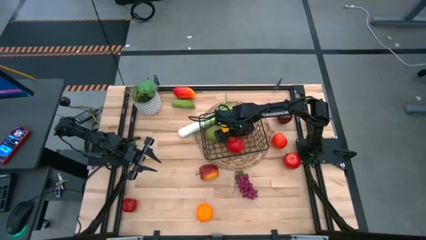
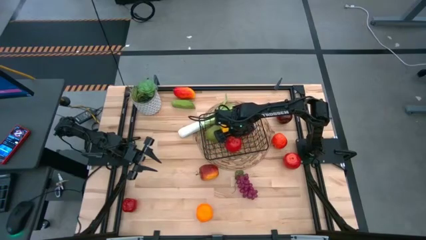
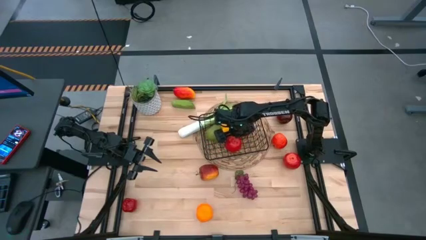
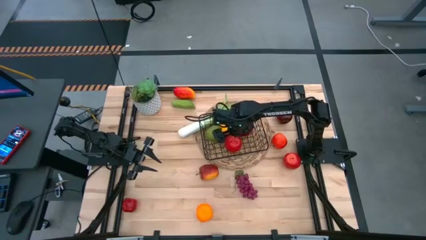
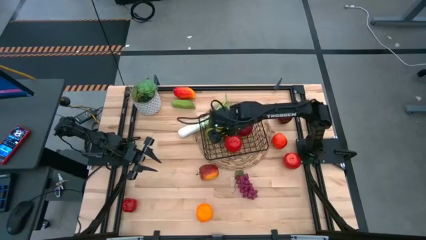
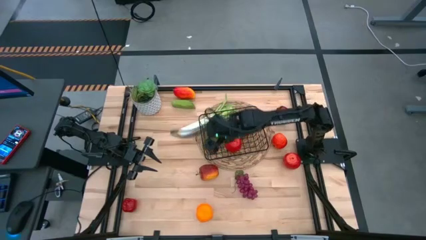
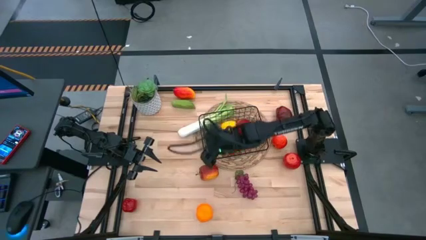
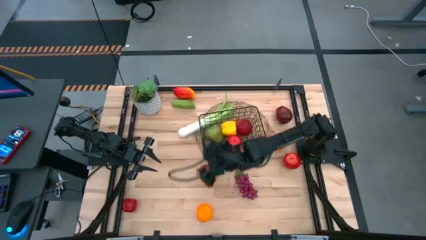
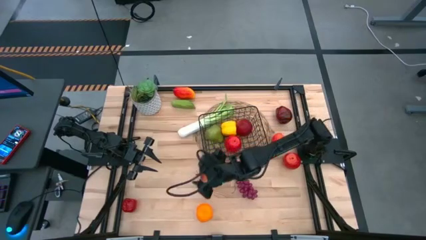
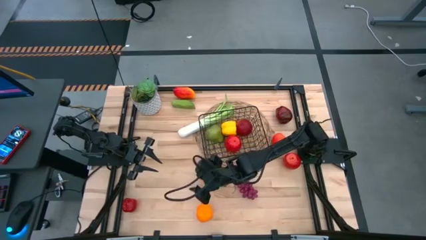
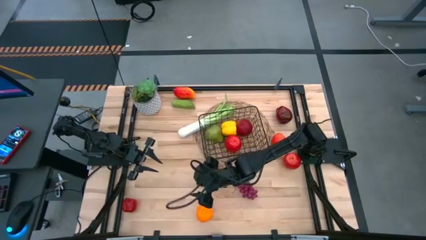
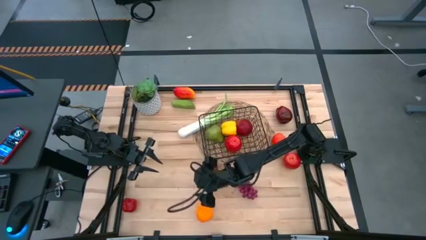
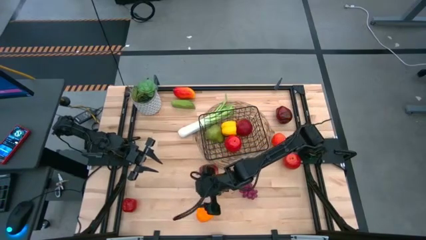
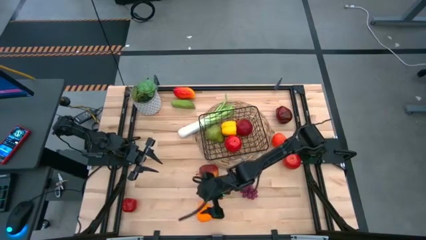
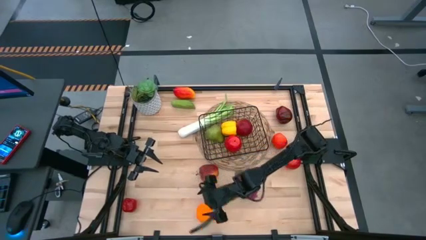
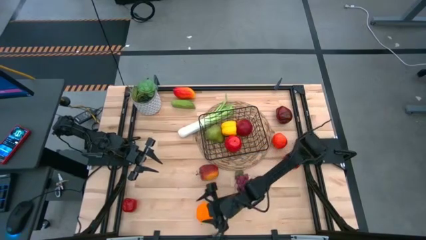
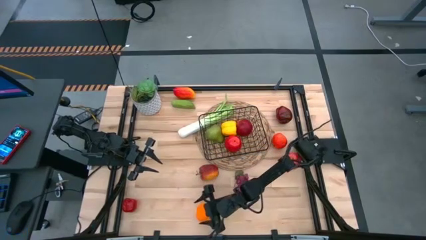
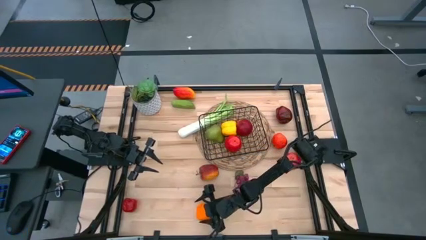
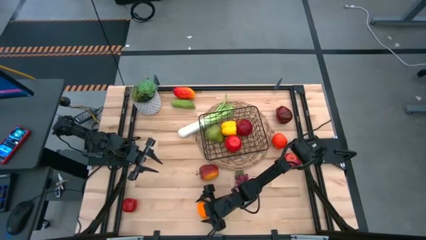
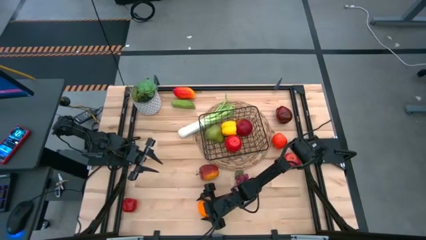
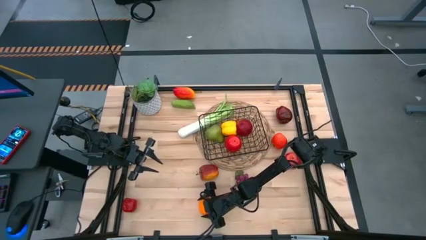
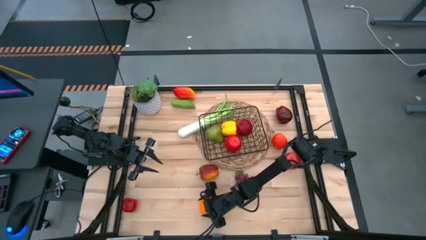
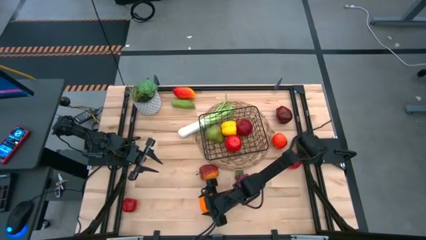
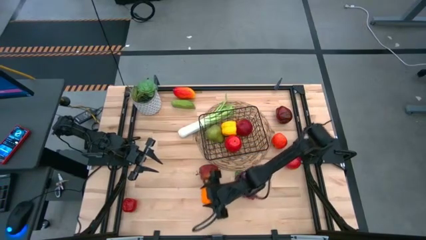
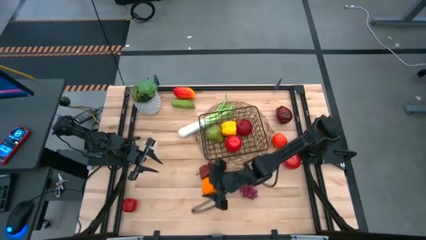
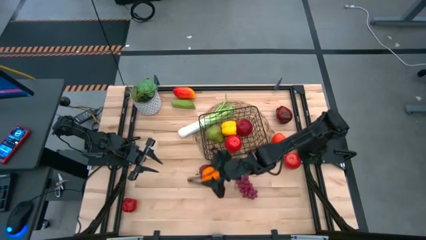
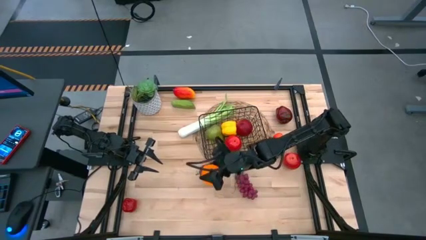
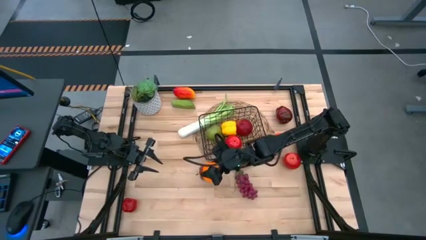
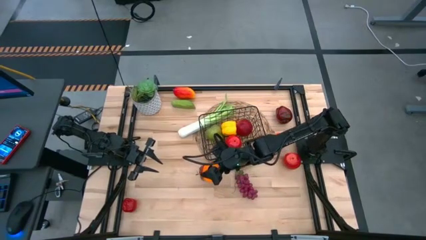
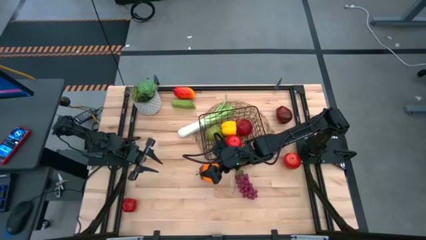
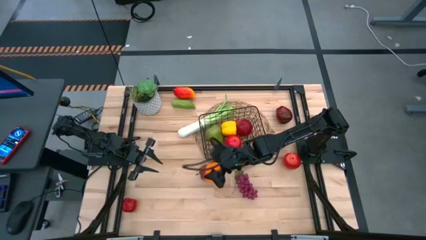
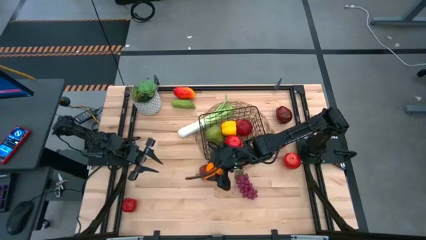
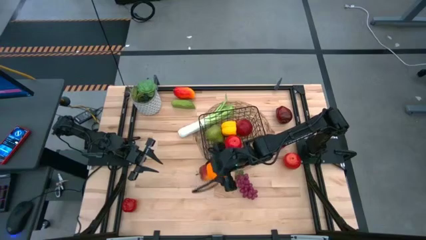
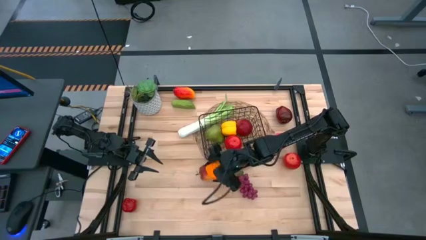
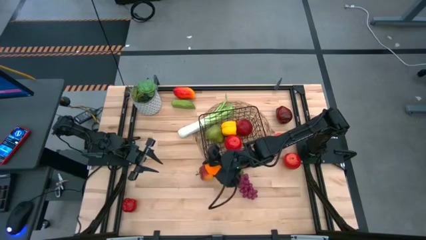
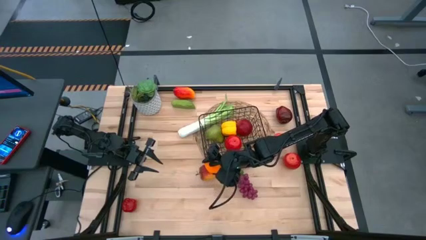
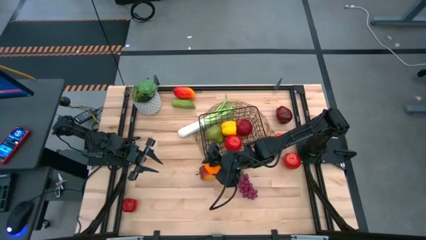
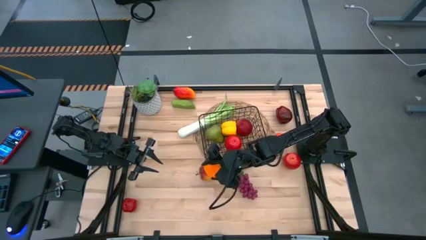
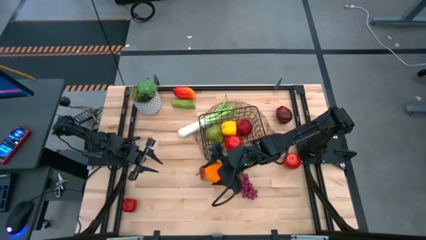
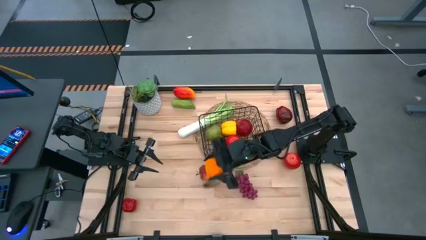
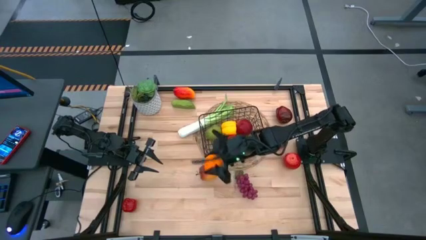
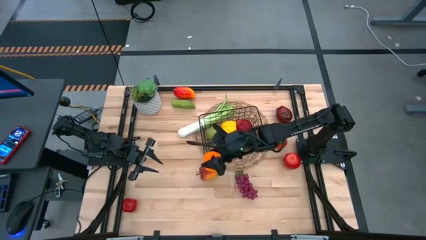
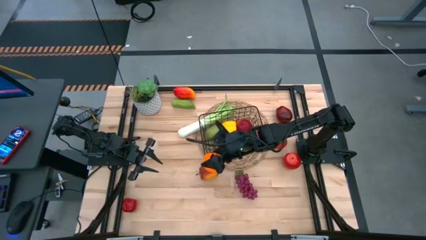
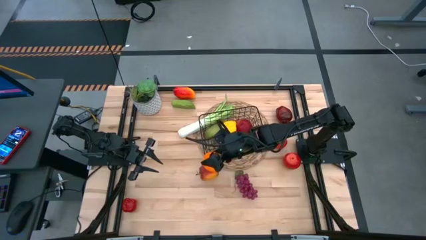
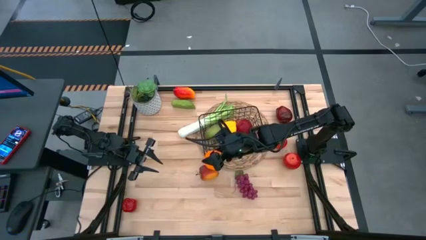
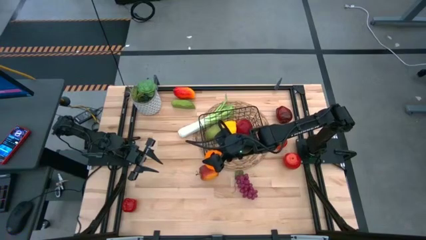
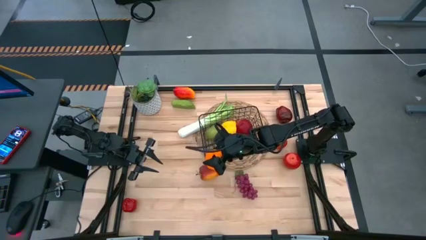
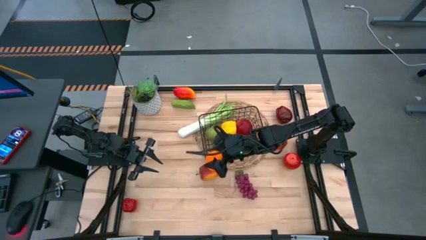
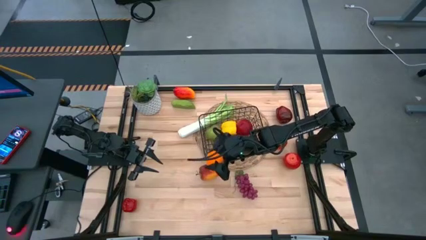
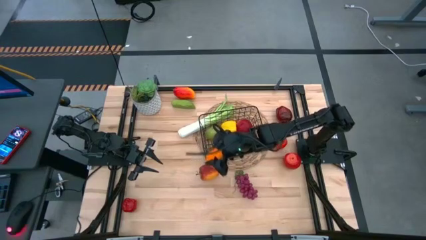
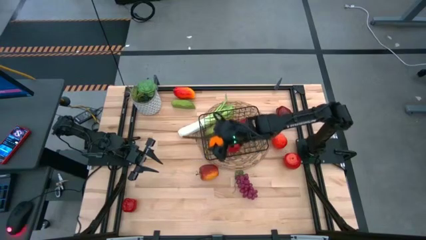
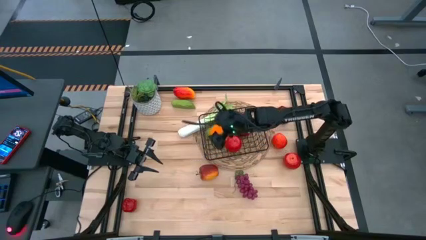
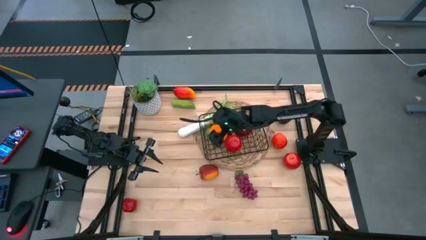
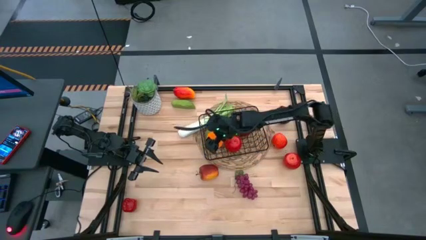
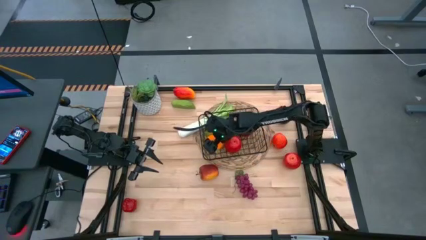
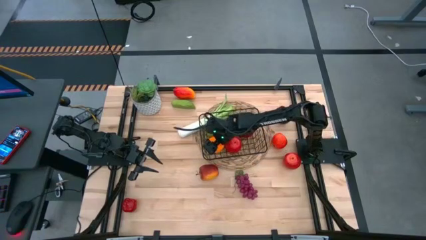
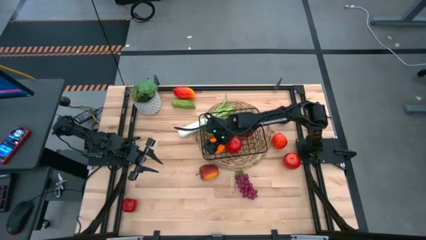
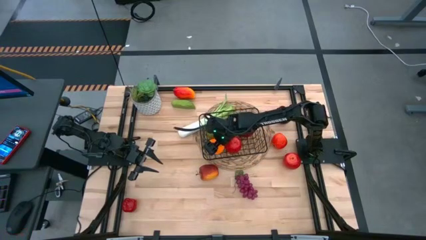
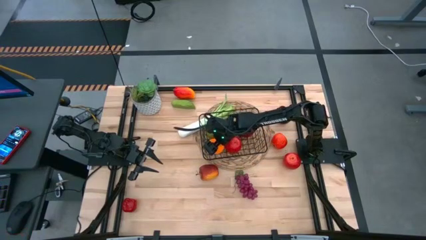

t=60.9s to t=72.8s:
Task: Build produce basket
Put the orange into the wire basket

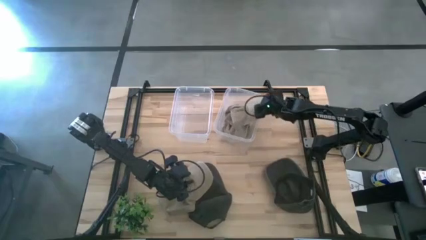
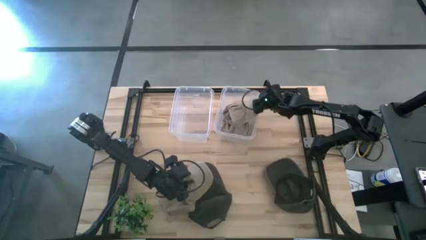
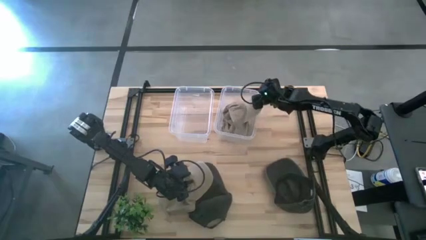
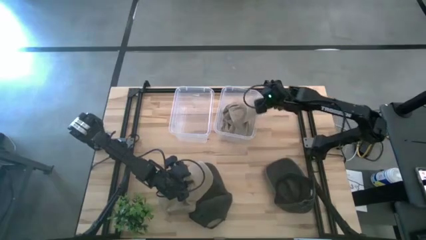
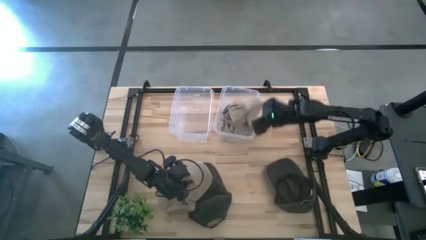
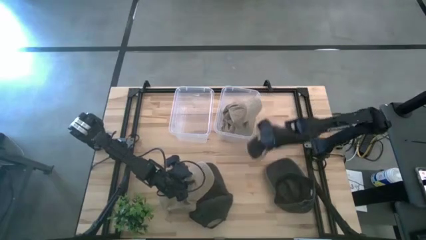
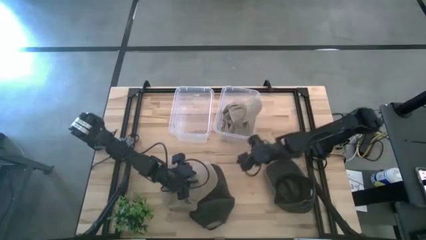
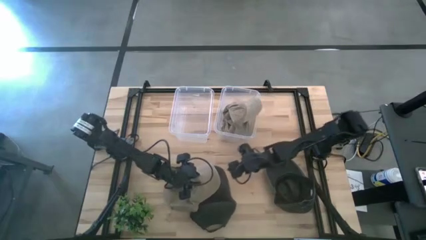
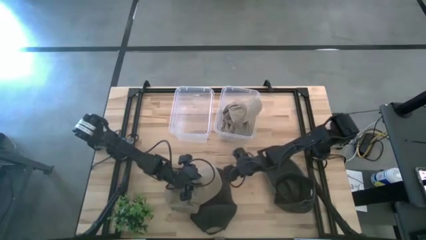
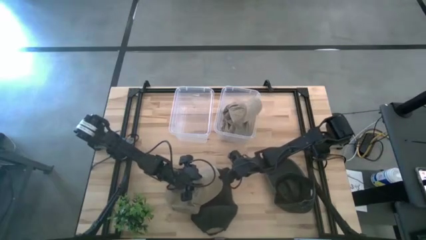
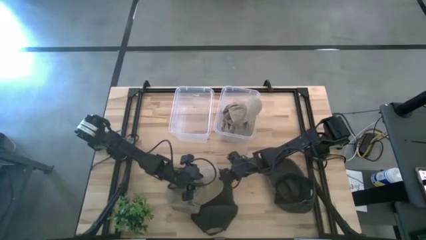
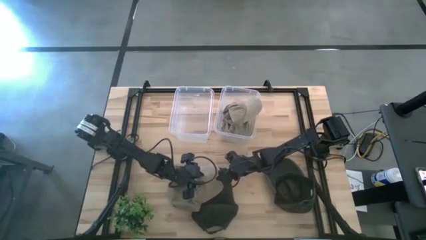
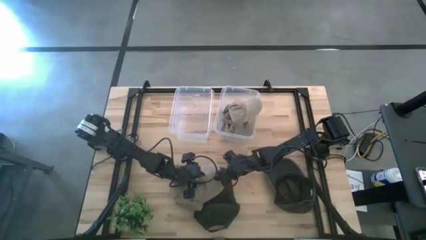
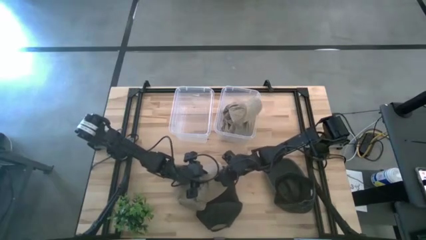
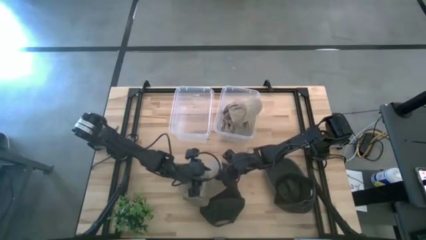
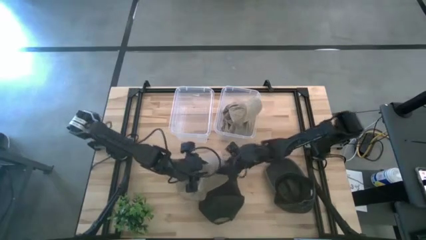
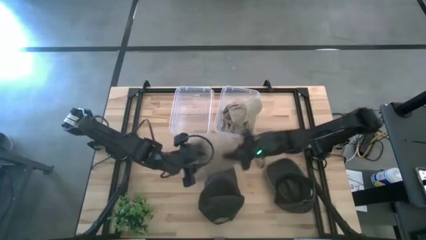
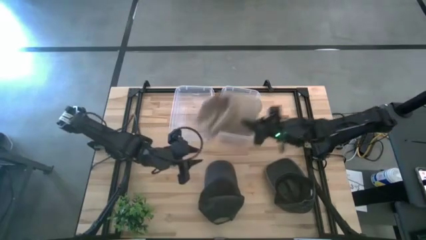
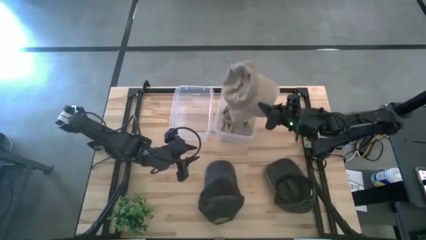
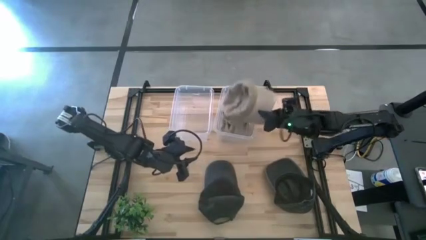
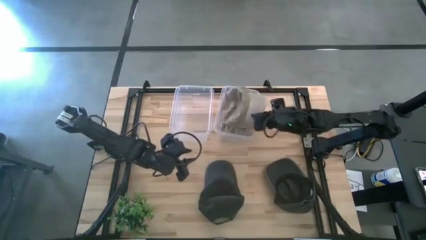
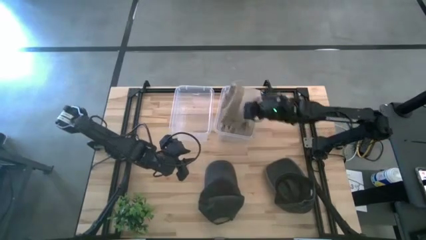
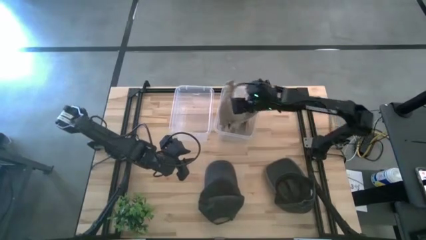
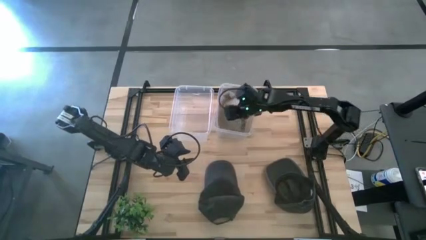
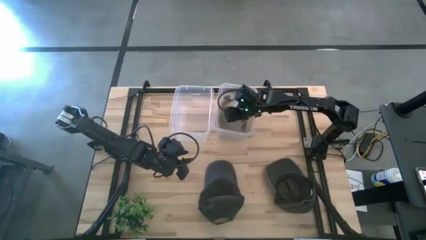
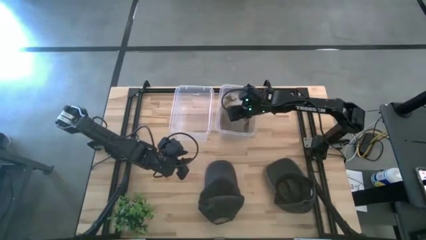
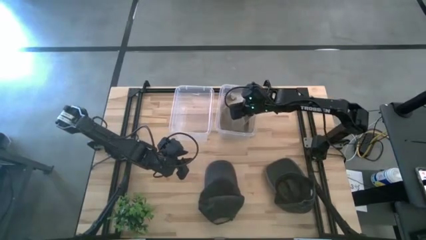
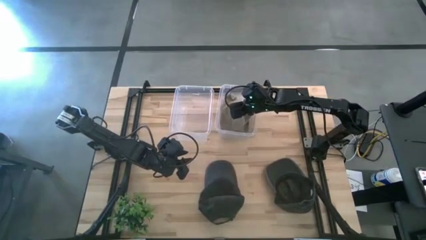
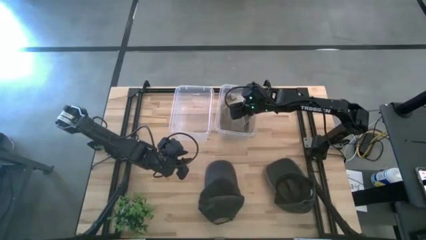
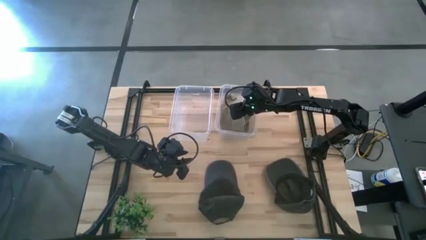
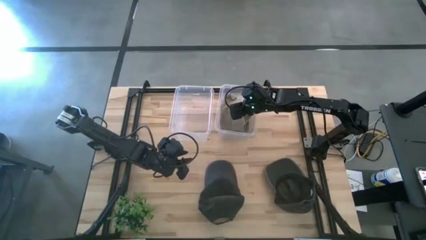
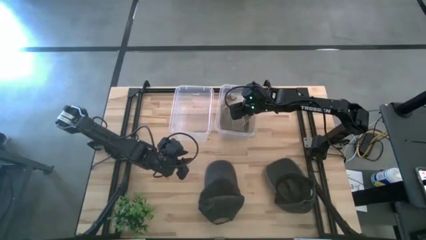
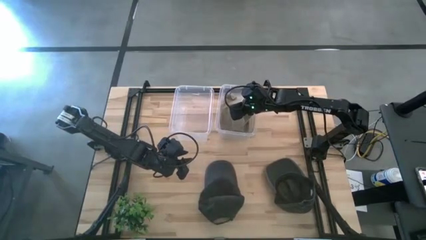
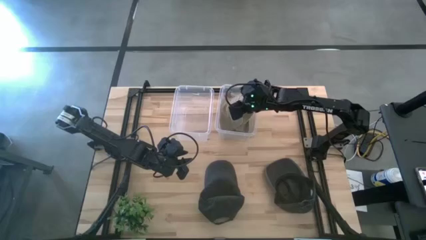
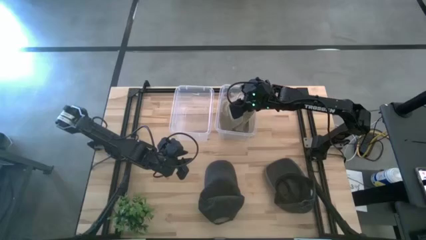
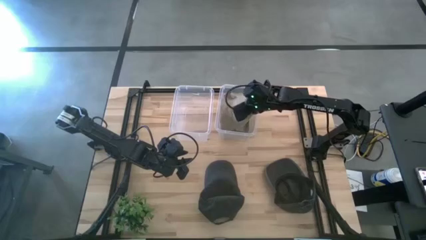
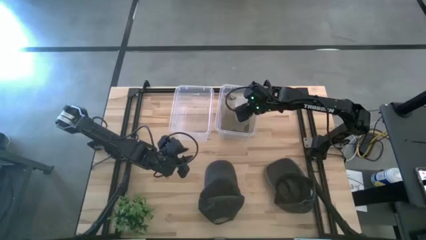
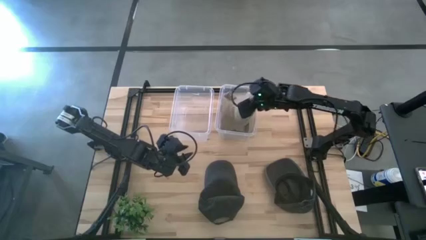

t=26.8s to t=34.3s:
Task: Pick & Place hat
Put the brown cap into the right transparent bin
